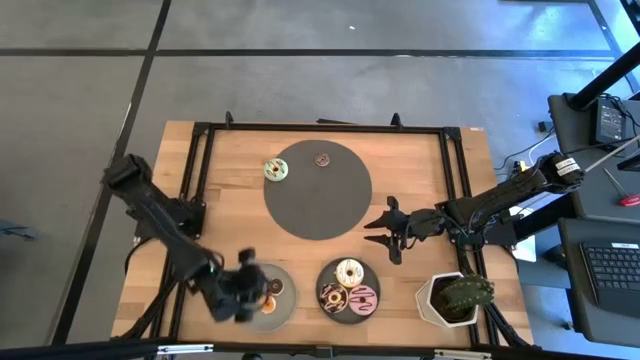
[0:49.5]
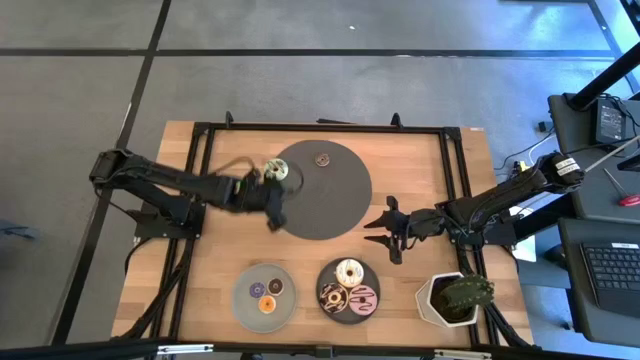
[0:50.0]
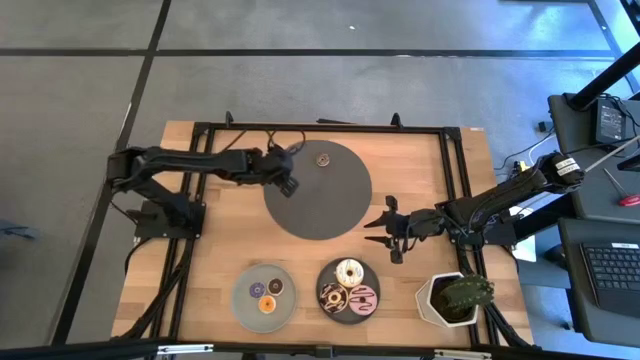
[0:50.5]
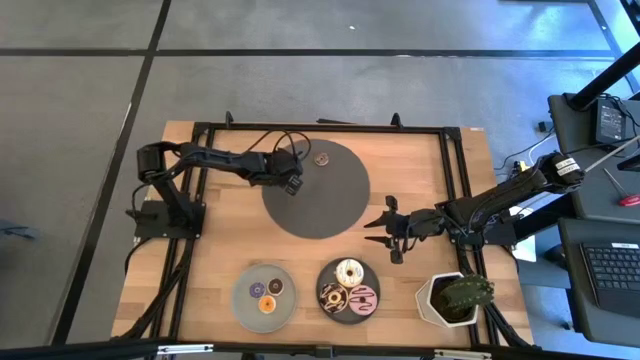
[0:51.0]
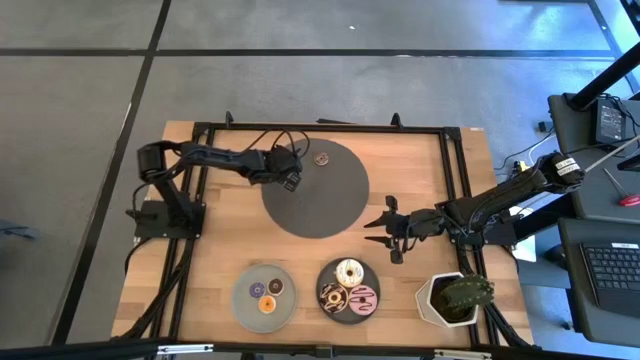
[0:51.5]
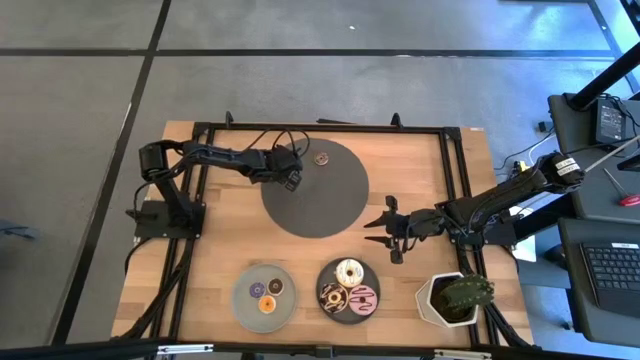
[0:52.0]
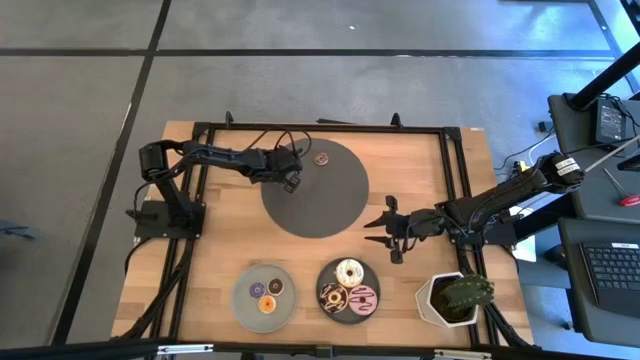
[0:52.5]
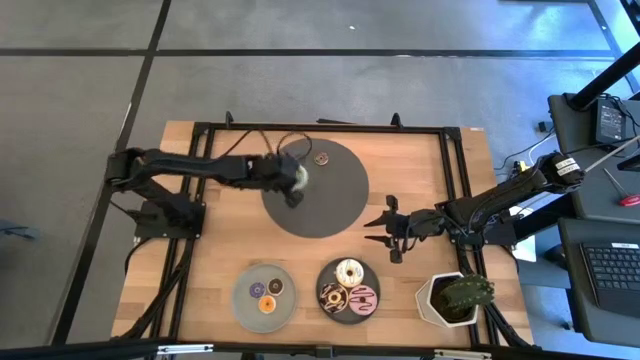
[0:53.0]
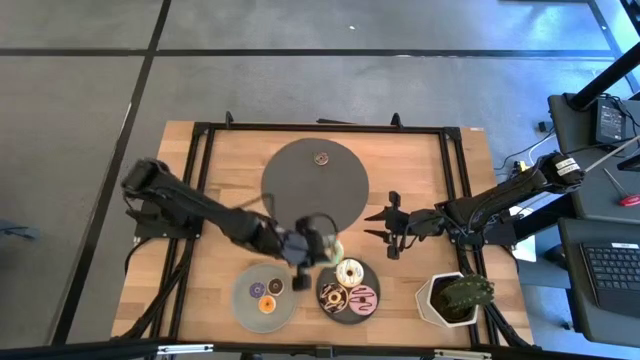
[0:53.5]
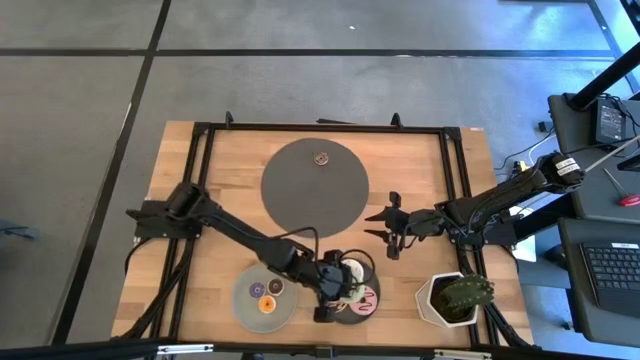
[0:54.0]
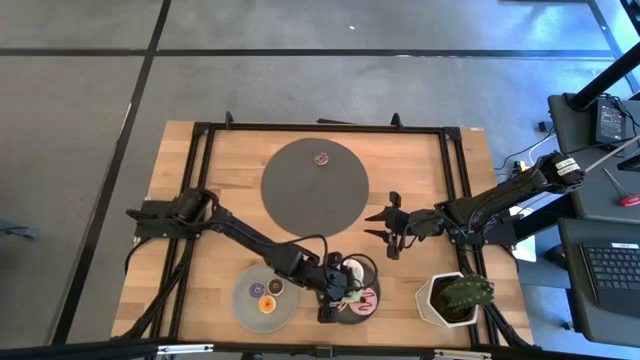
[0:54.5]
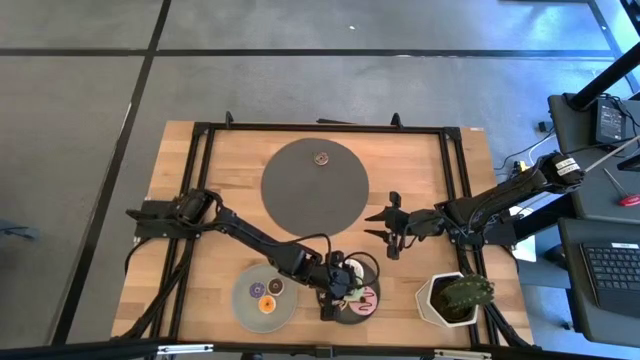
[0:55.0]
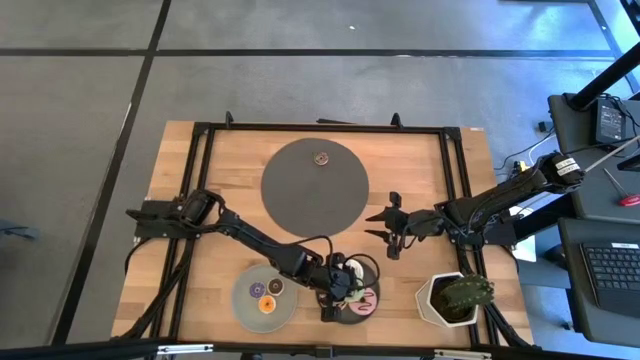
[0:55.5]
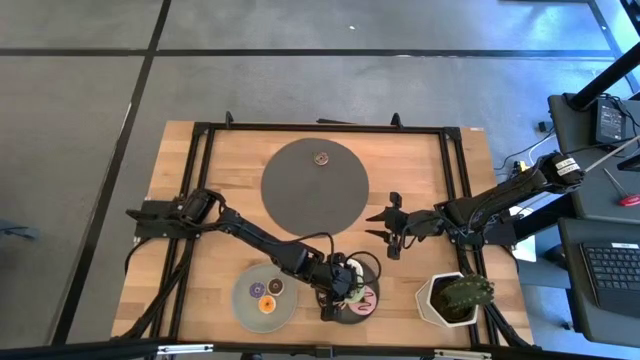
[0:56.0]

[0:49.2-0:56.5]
Task: Pick & Place donuts
Put the big light blue donut on the dark gray plate

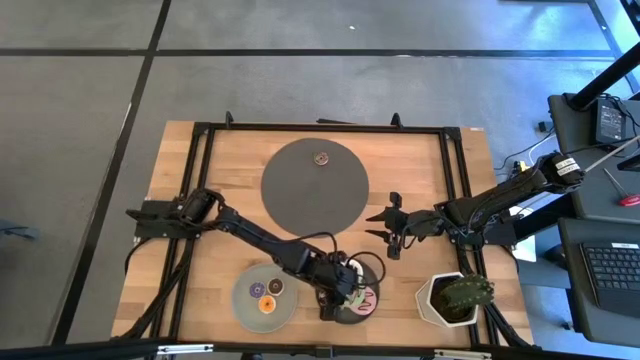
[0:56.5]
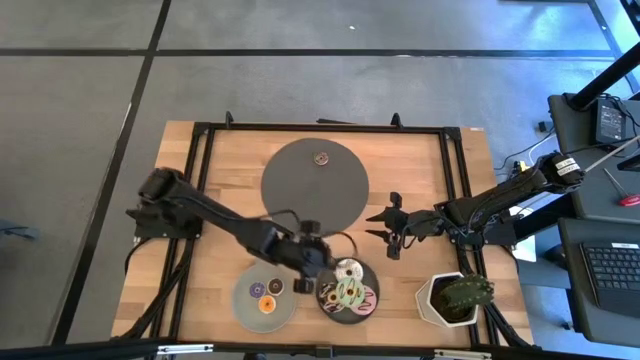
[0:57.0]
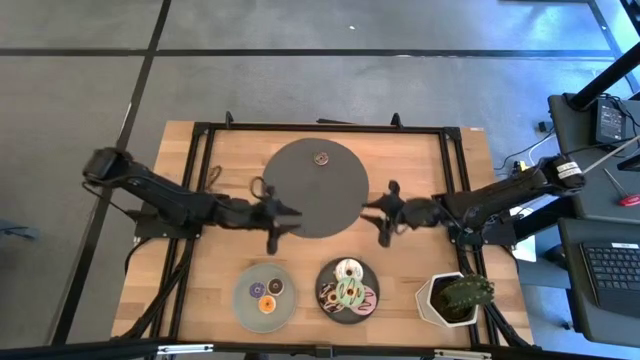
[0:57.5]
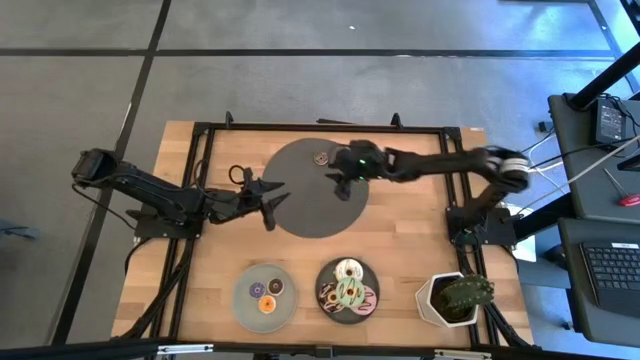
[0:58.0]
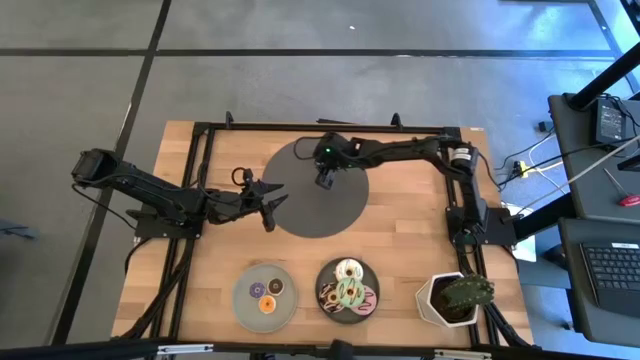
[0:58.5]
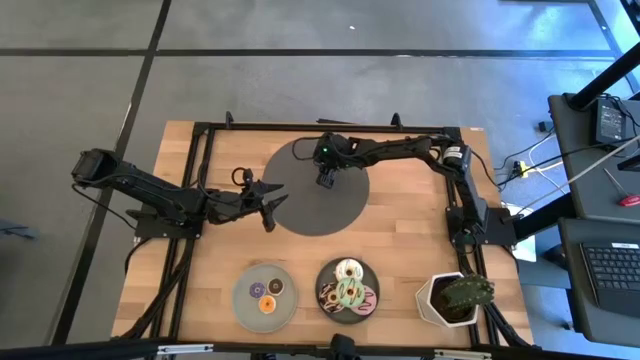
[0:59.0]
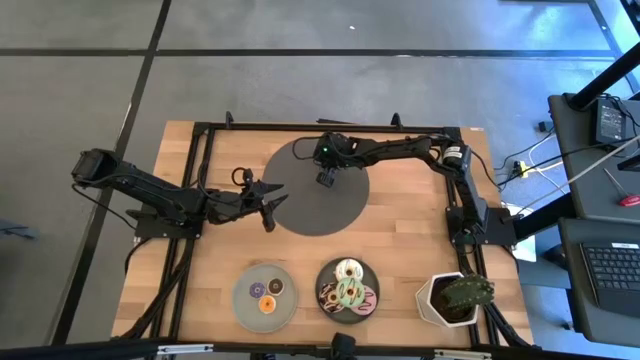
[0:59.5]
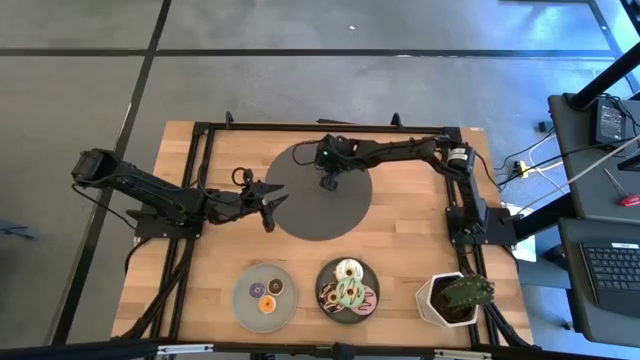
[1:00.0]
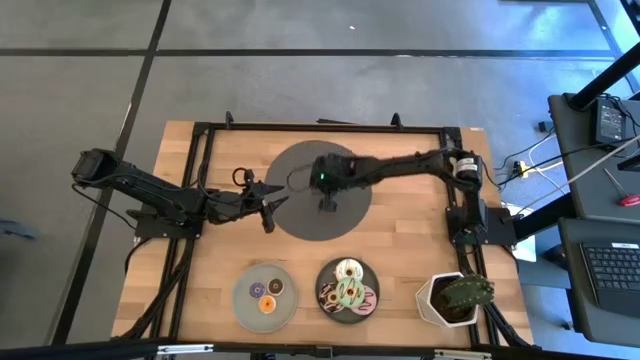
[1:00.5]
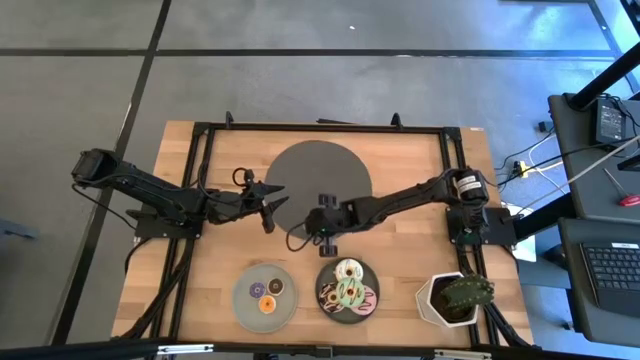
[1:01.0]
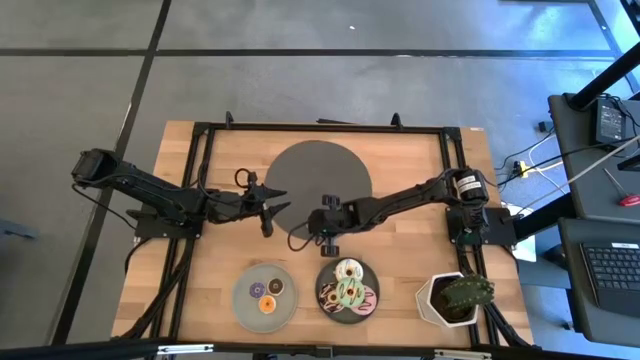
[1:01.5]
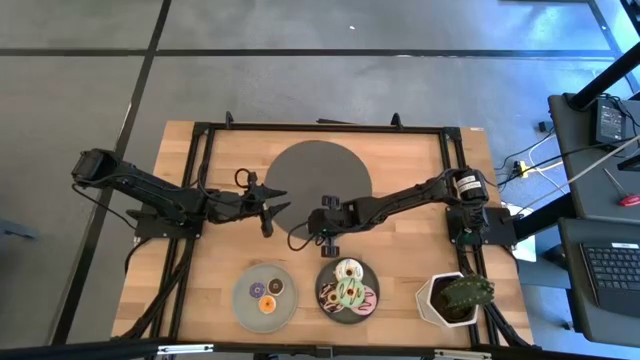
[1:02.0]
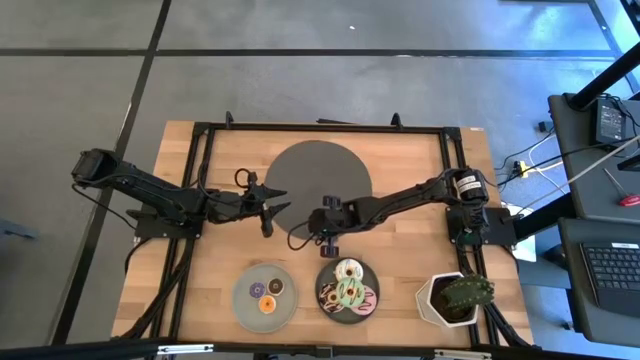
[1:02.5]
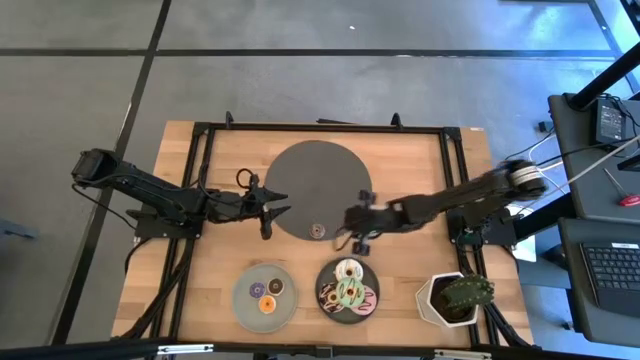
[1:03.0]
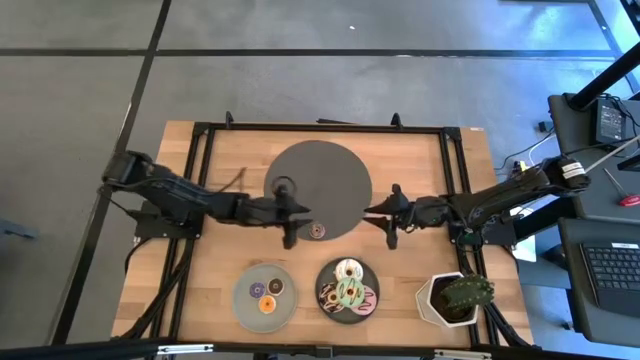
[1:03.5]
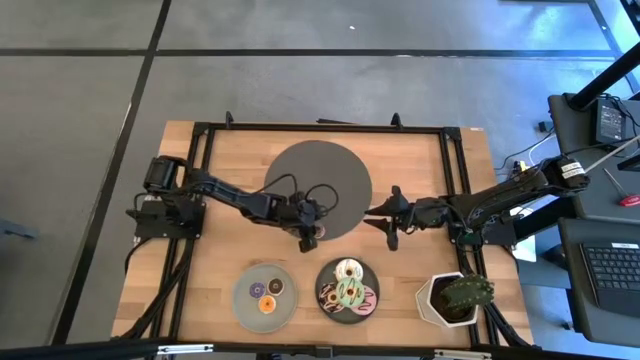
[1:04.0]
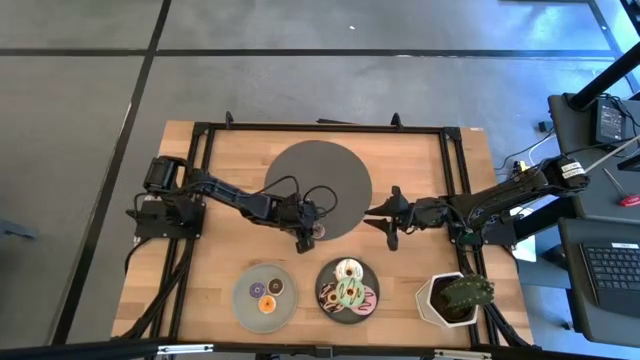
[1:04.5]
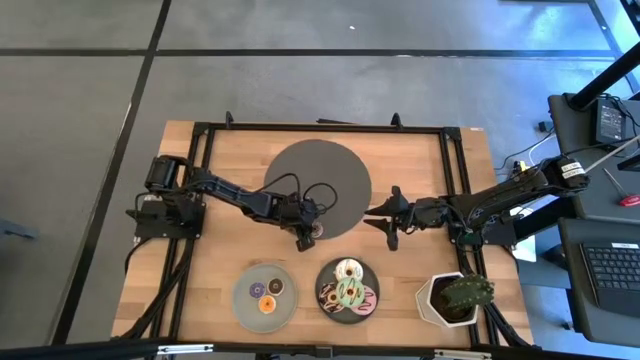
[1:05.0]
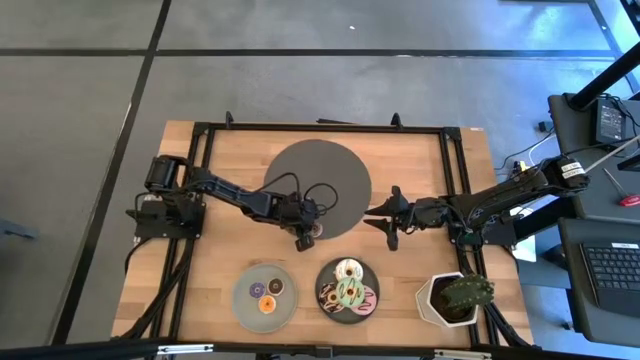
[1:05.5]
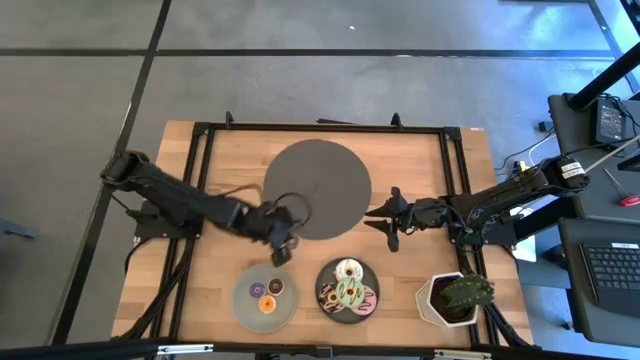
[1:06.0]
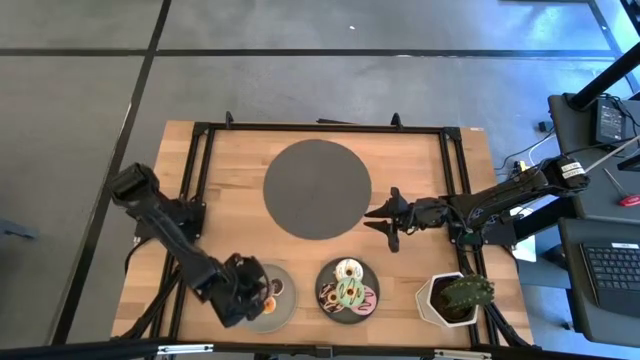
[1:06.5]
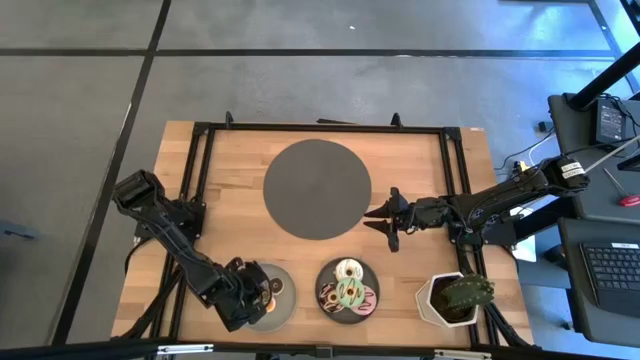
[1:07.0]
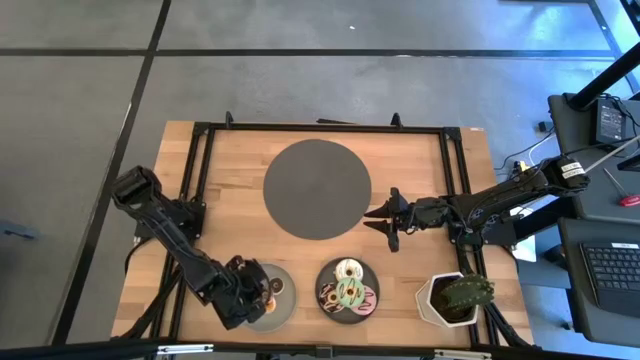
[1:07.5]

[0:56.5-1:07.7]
Put the small brown donut on the gray plate

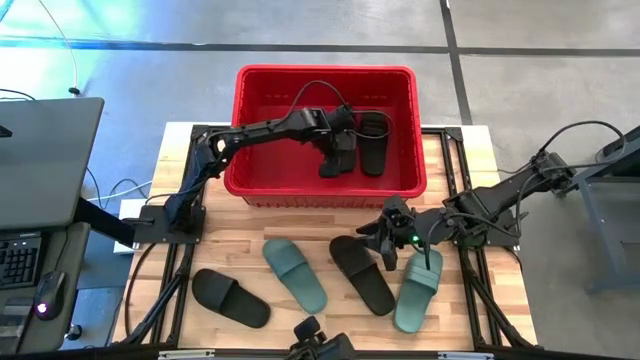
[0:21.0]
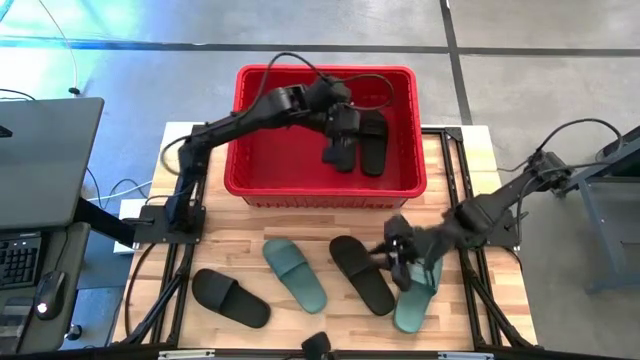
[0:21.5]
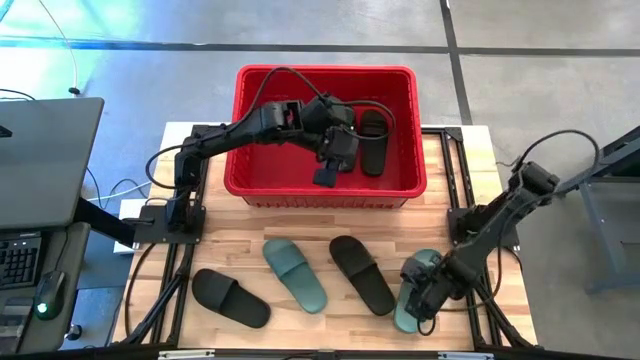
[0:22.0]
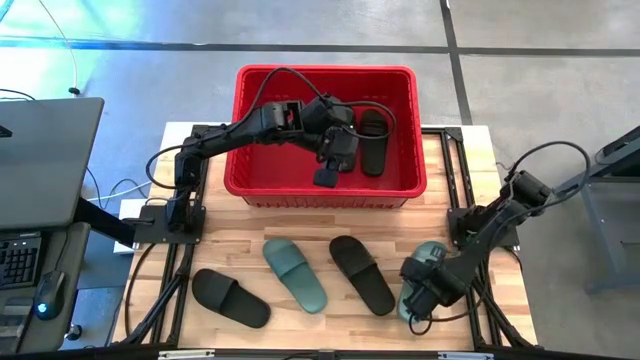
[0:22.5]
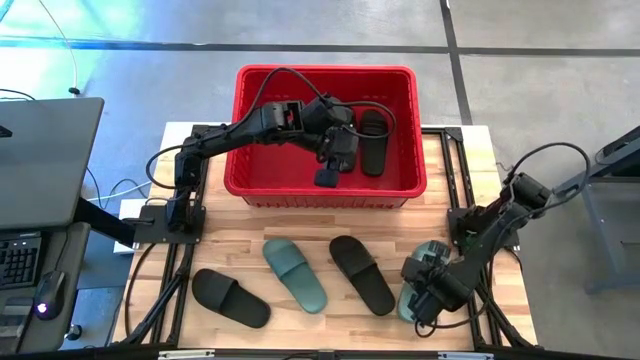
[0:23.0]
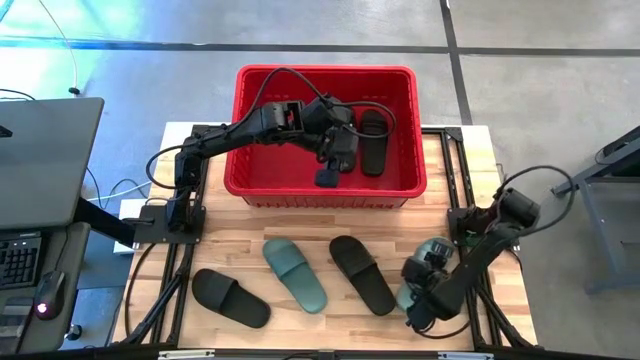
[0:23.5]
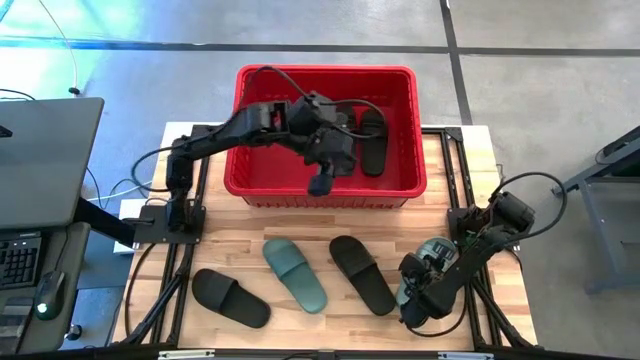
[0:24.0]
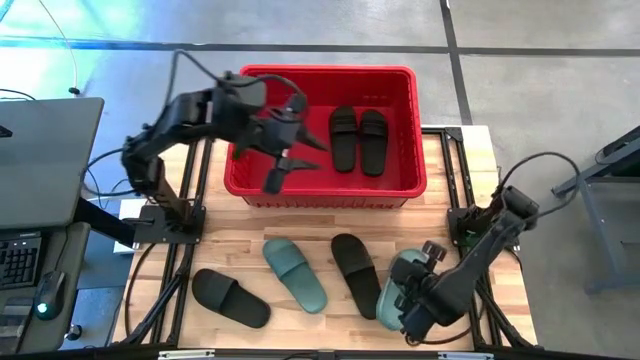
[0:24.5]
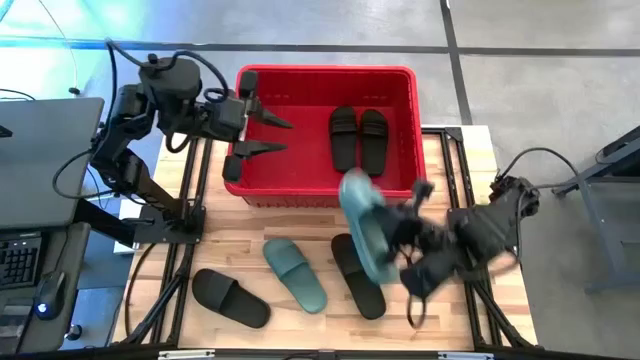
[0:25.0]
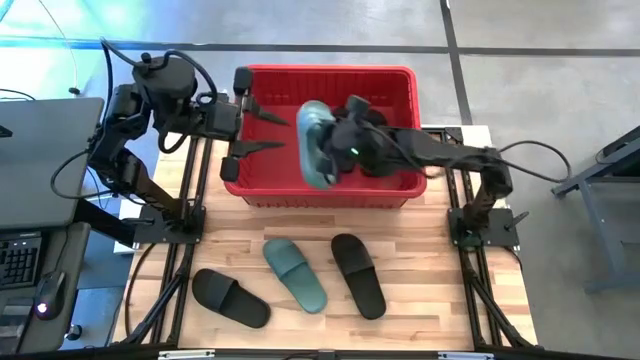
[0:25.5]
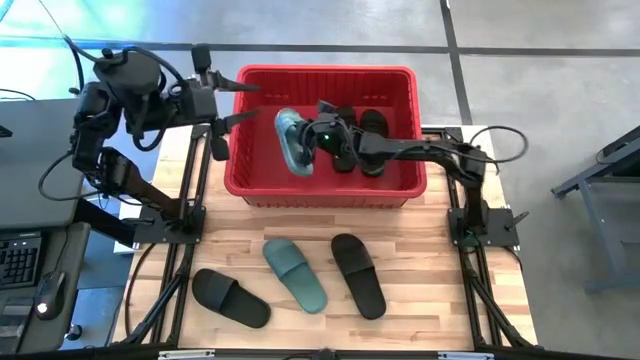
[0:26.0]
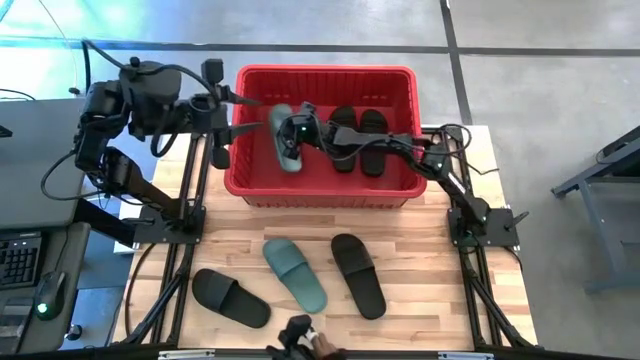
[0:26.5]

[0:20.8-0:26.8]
Task: Pick and place slides into bin
Put the green slide into the red bin
